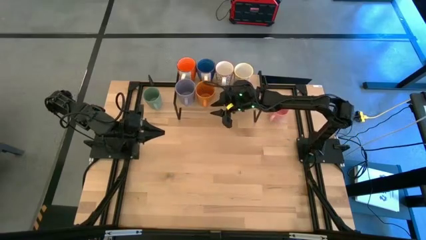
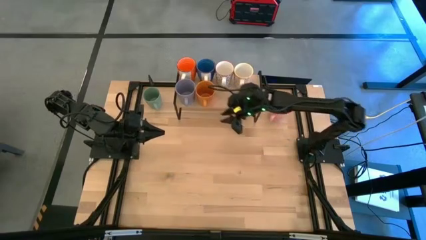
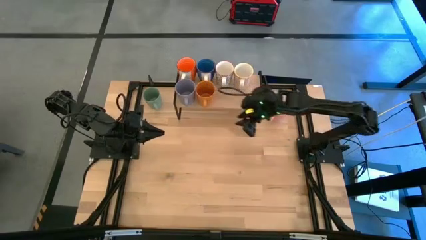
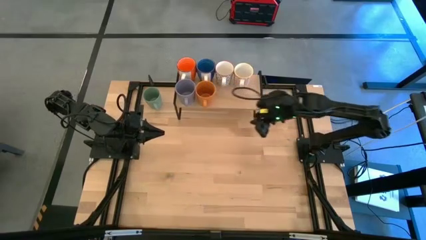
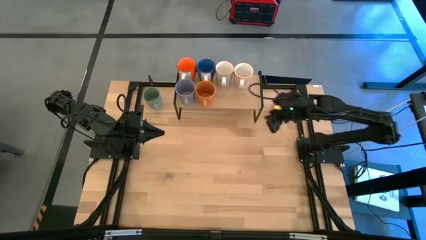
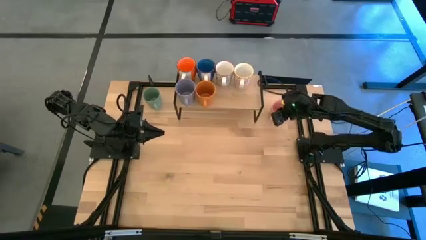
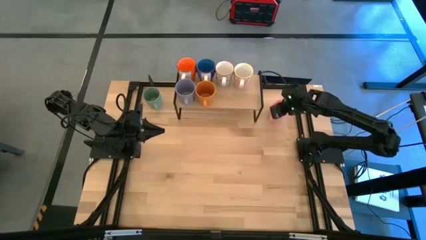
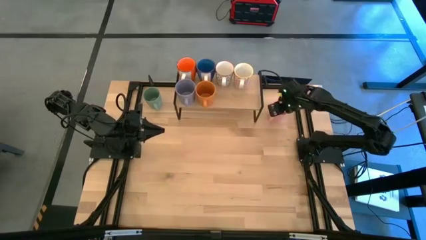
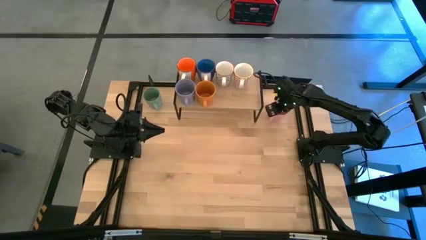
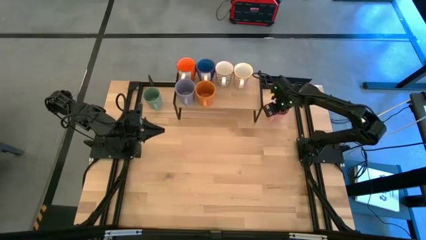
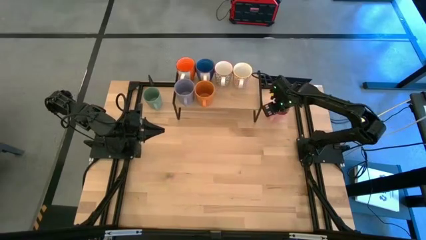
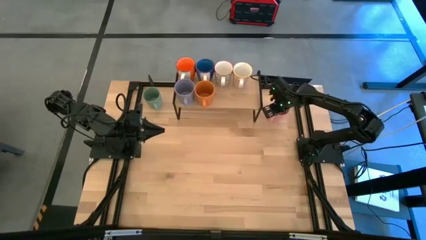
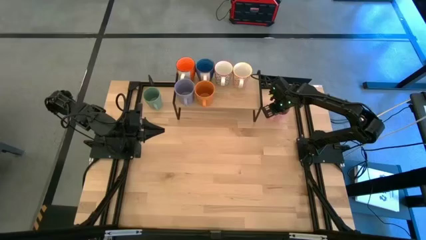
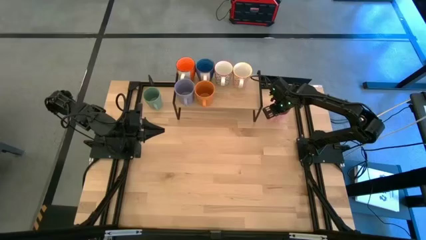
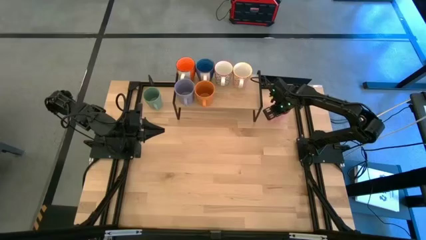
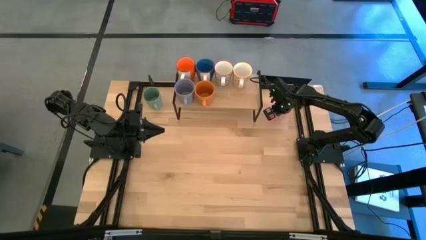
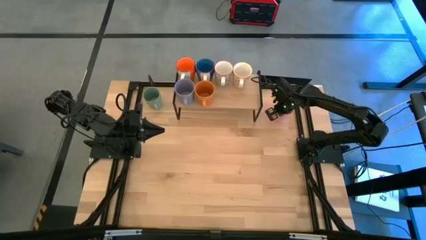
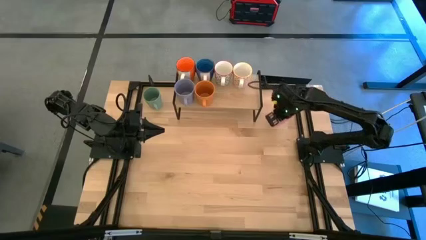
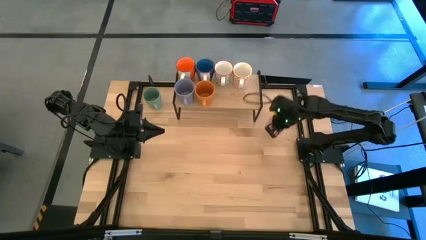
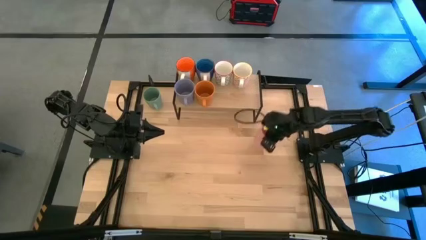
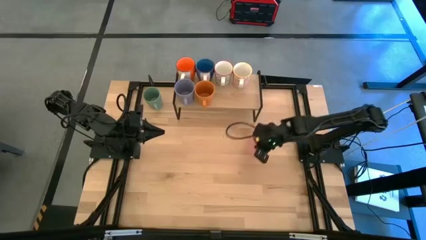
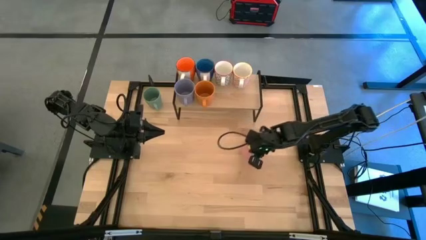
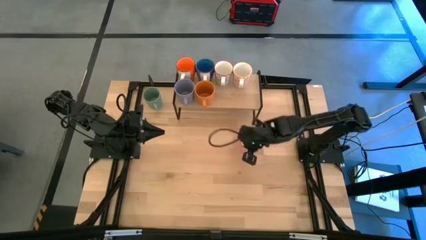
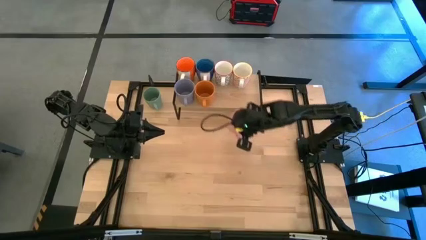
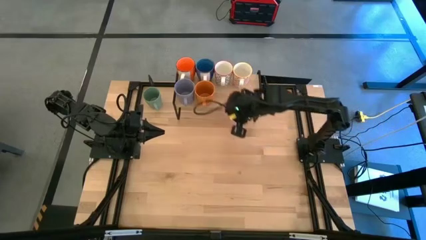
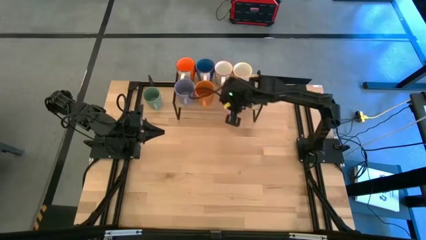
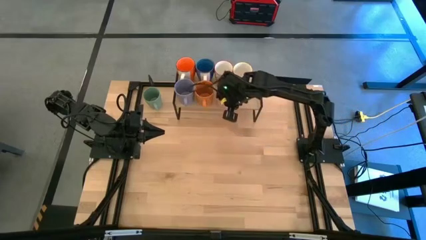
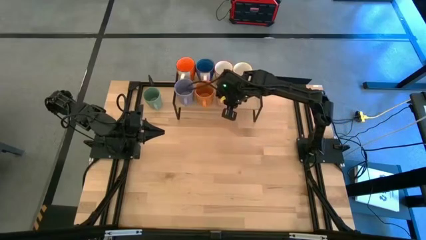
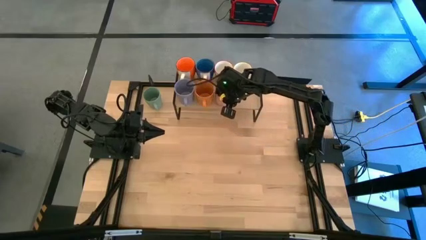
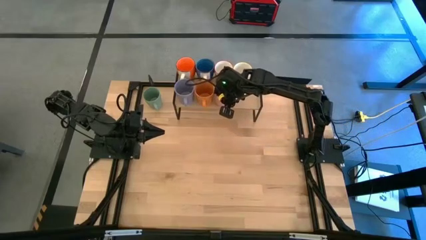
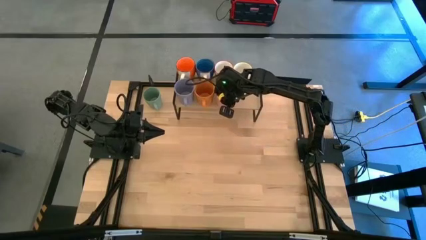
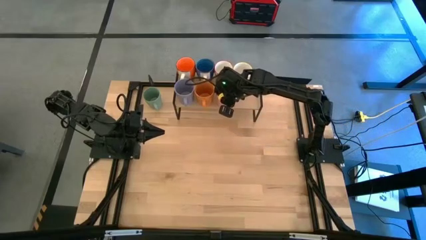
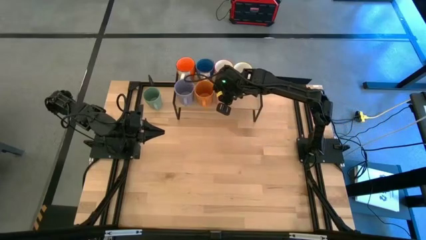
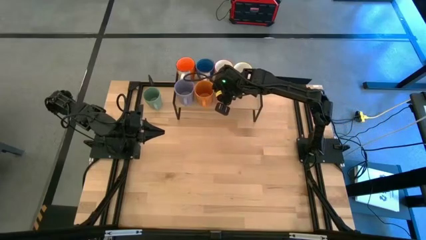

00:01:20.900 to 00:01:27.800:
Task: Place coffee mugs
Put the pink mug on the shelf

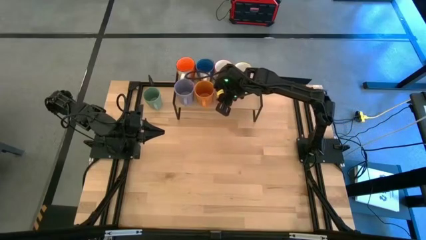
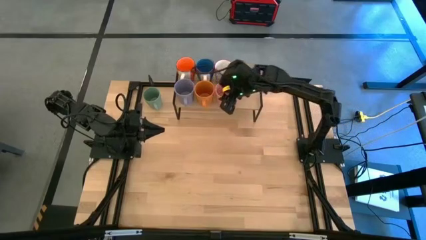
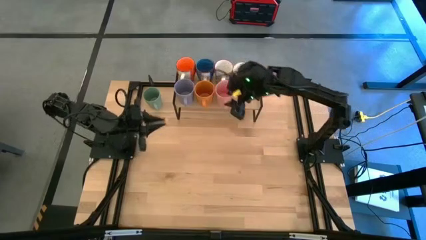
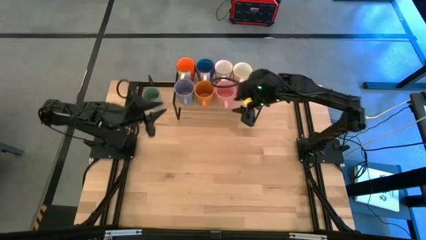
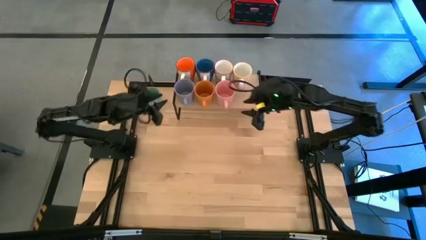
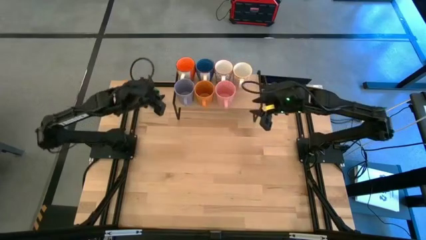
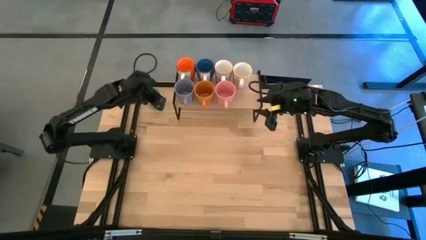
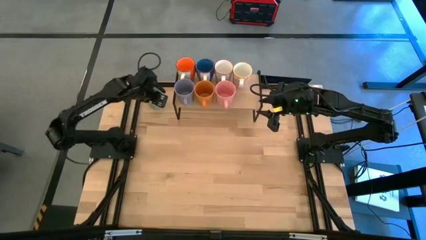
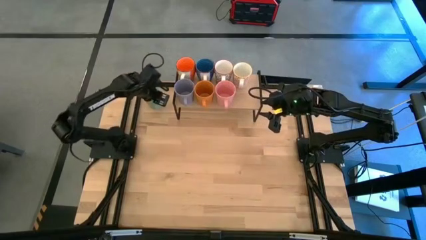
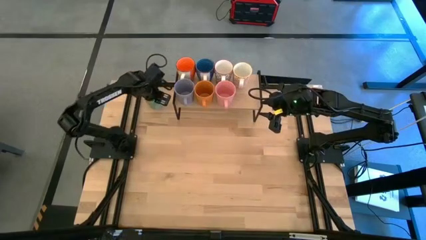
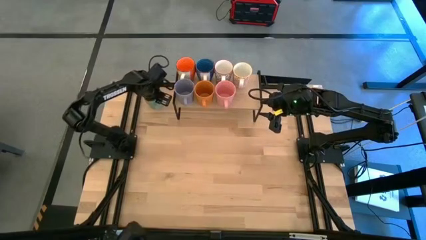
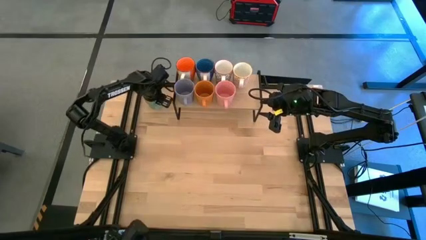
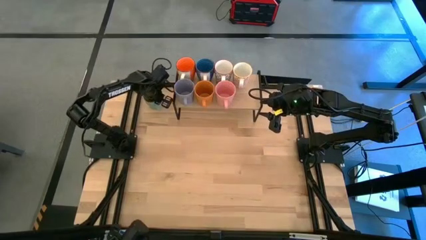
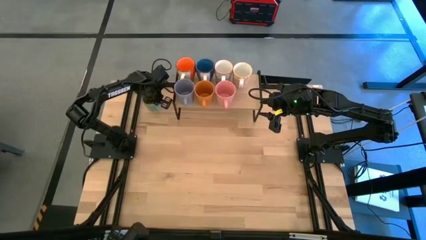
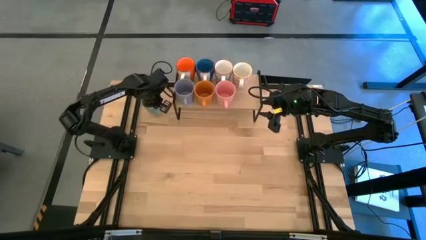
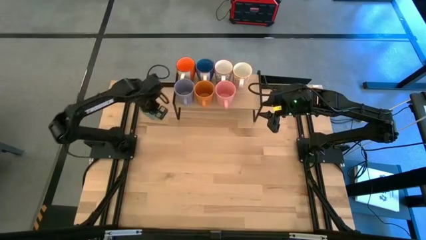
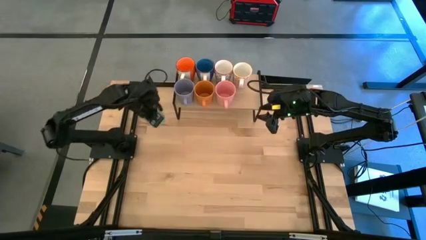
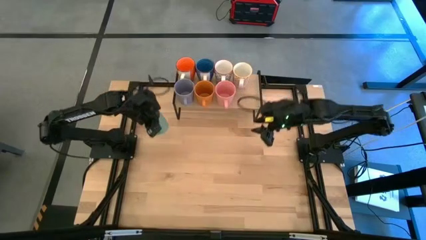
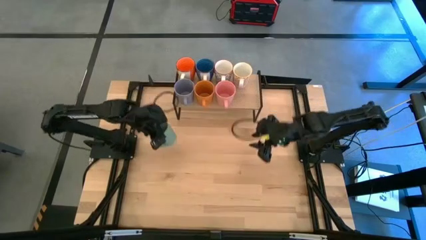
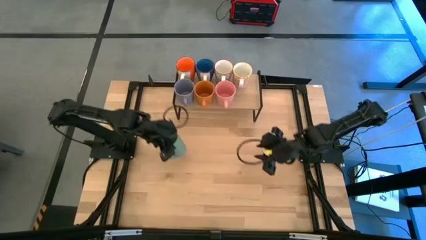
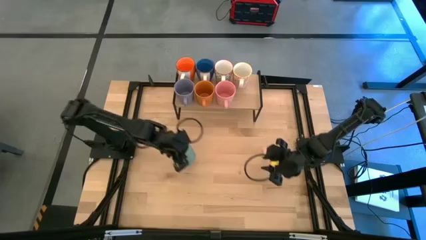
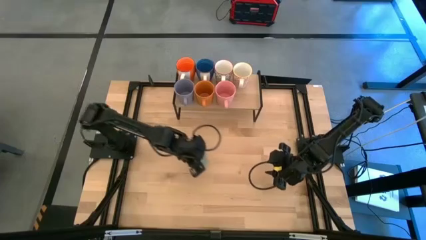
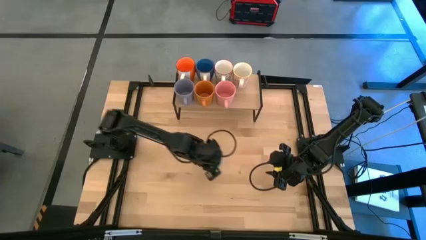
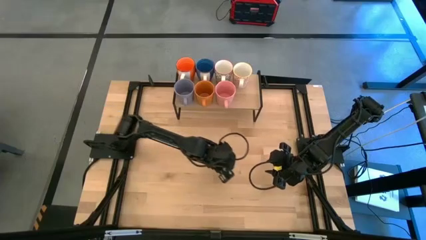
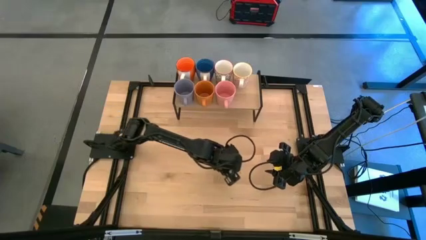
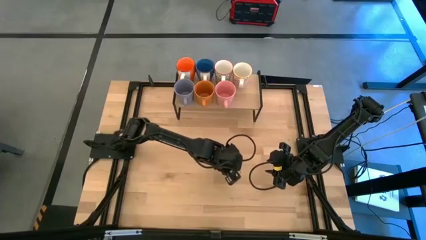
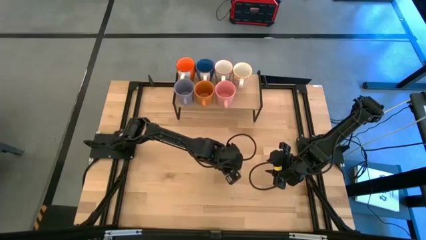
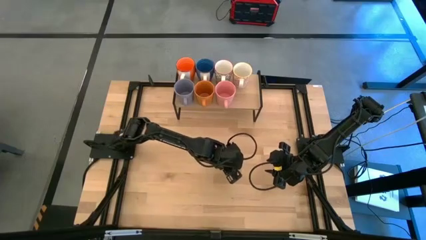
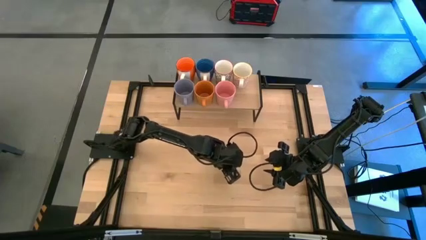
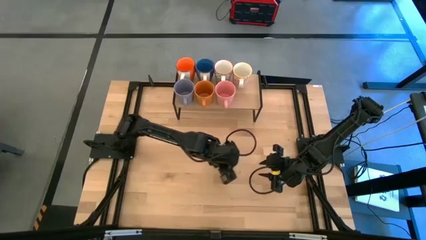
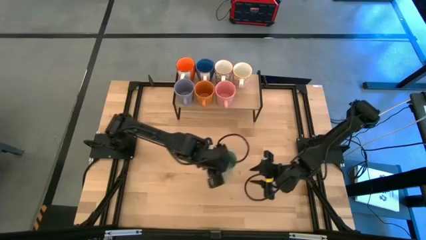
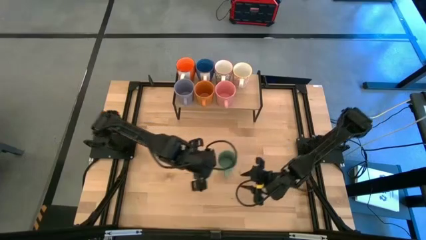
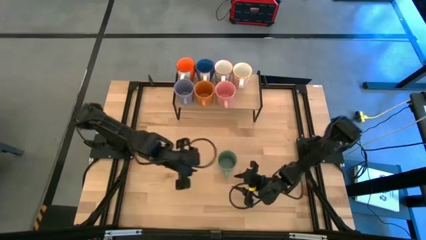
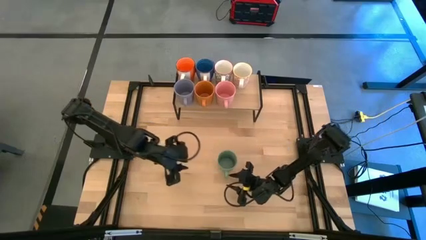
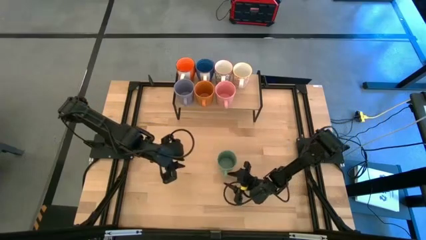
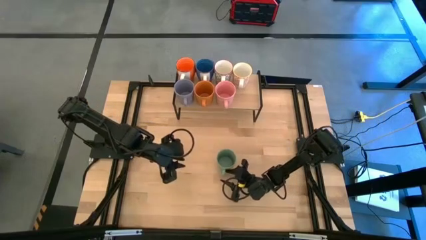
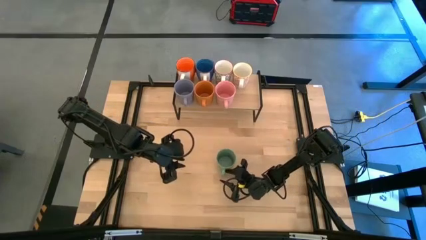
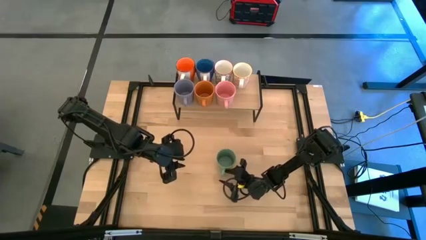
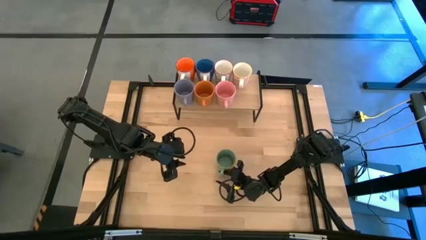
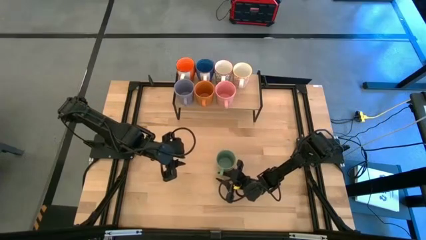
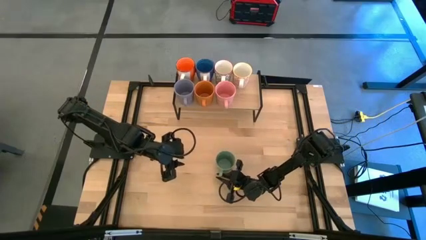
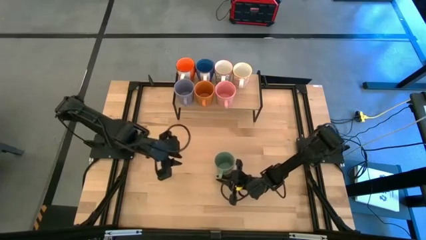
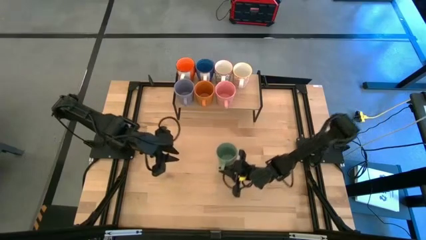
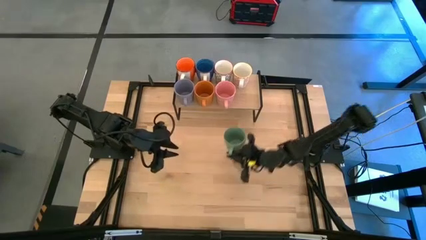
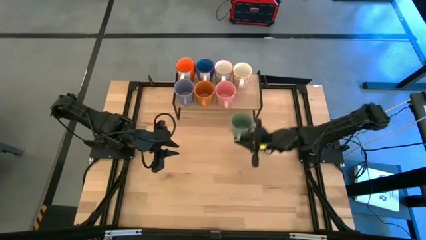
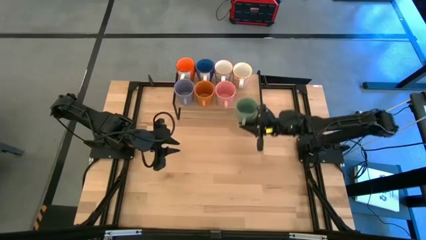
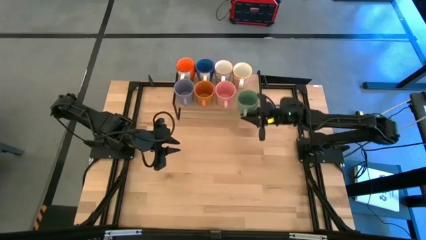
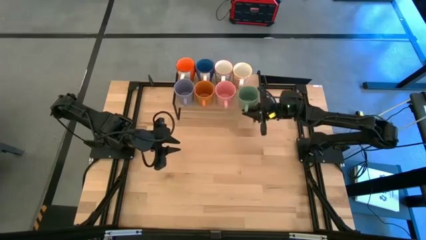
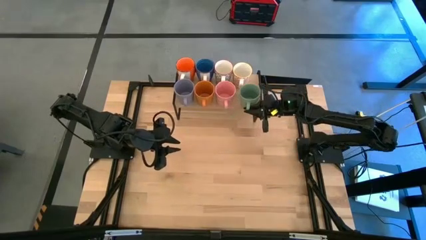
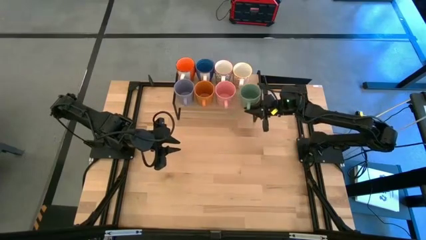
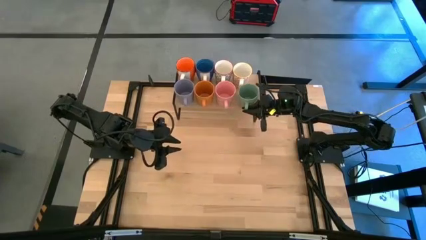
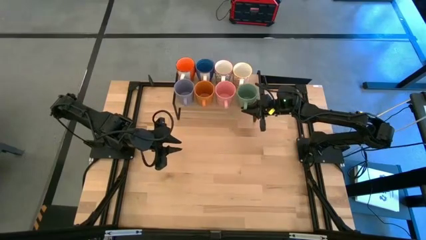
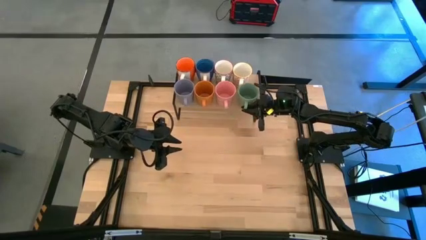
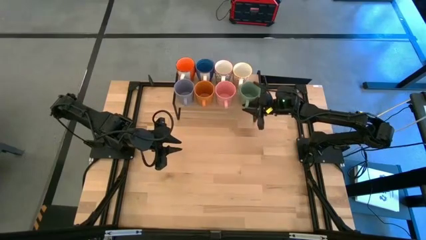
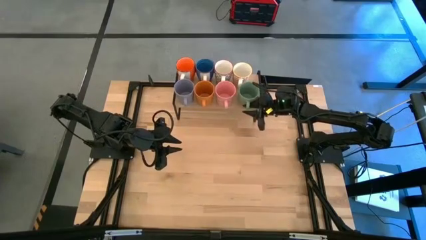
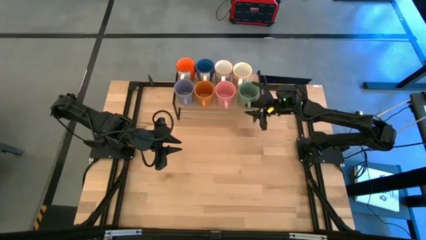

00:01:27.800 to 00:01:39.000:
Put the green mug on the shelf
